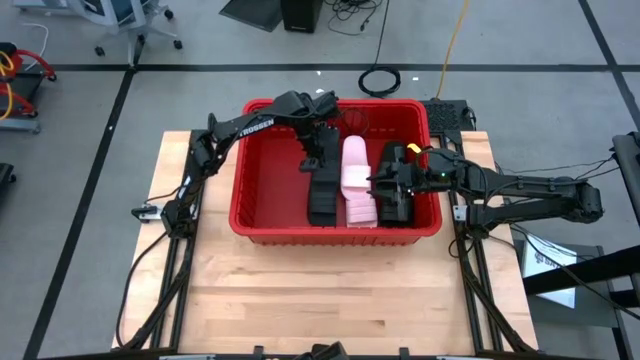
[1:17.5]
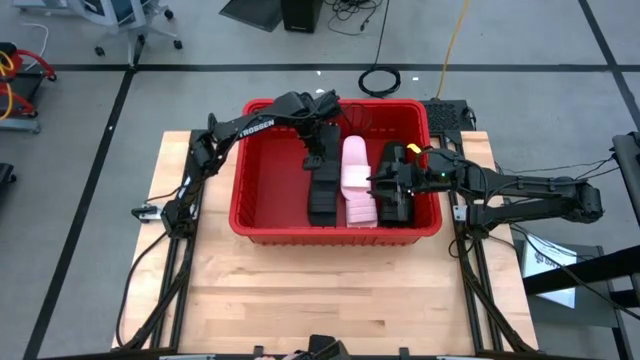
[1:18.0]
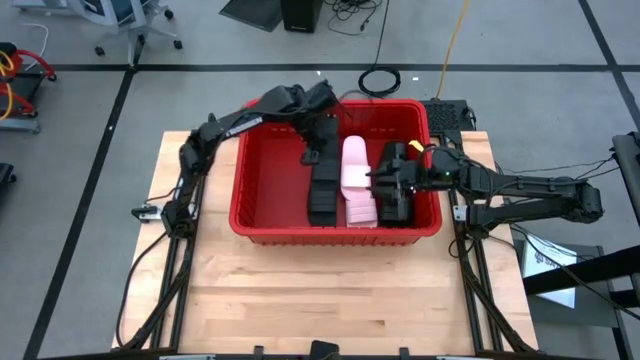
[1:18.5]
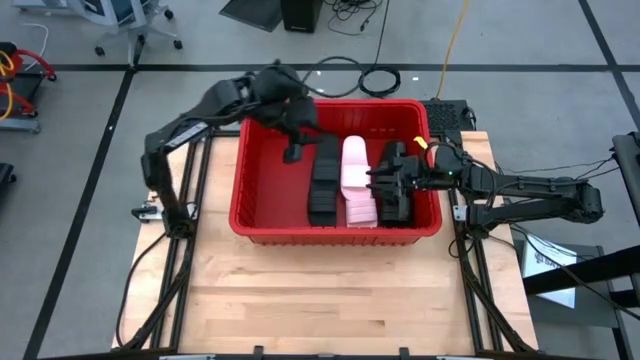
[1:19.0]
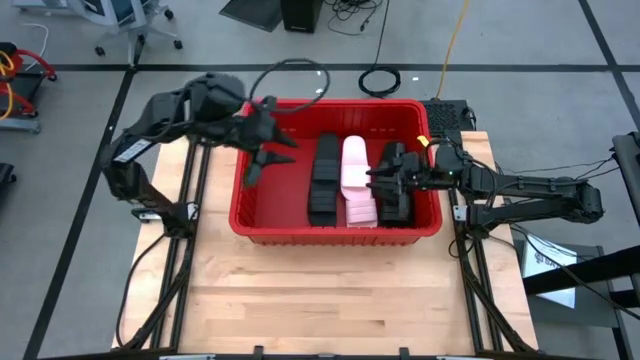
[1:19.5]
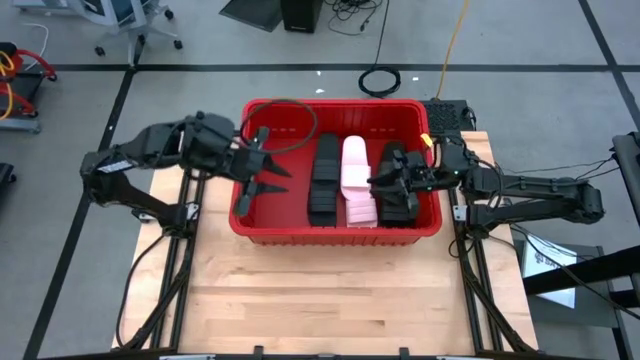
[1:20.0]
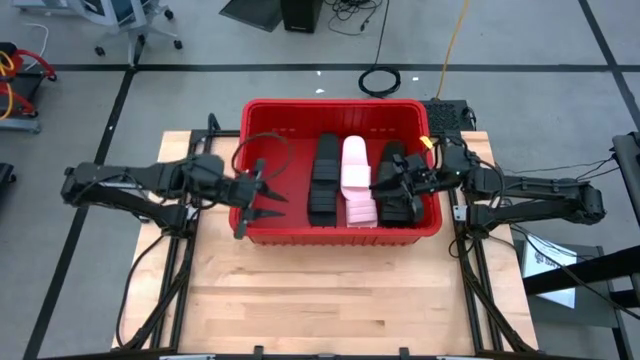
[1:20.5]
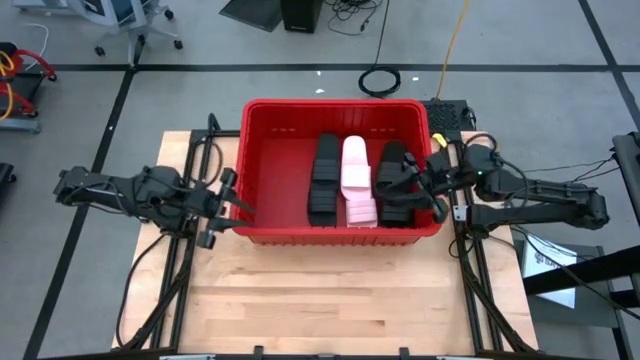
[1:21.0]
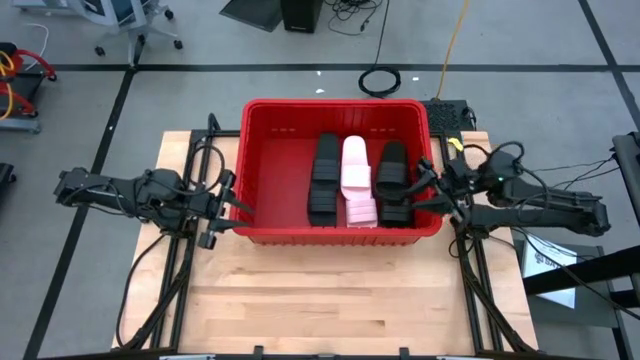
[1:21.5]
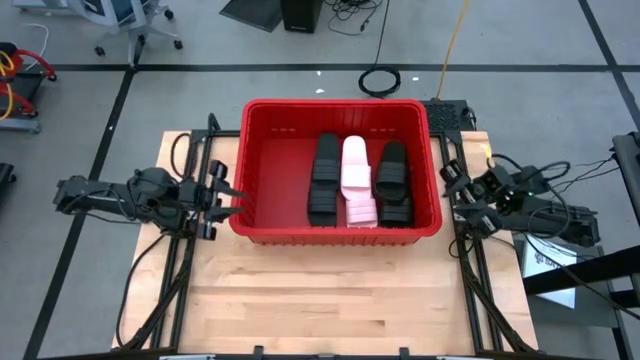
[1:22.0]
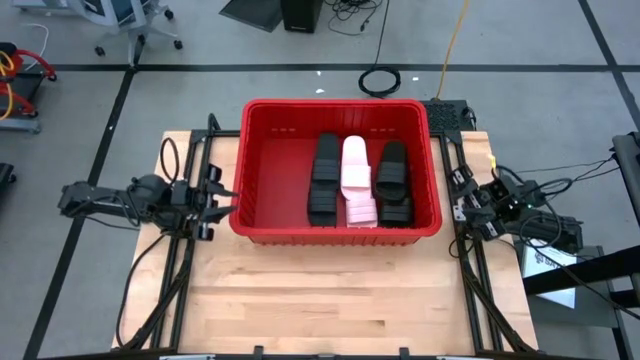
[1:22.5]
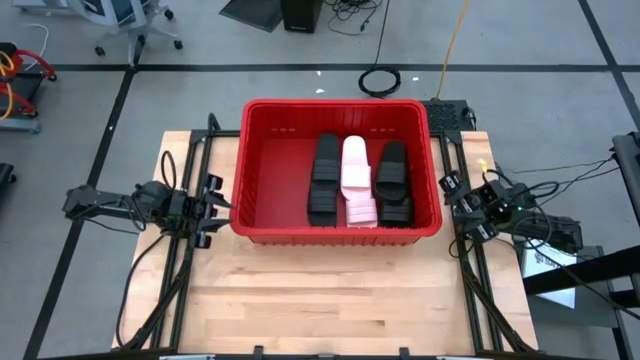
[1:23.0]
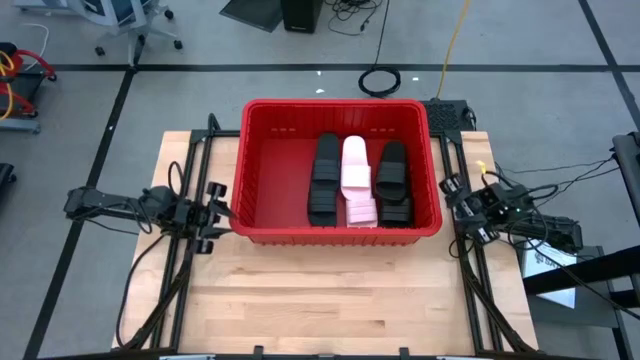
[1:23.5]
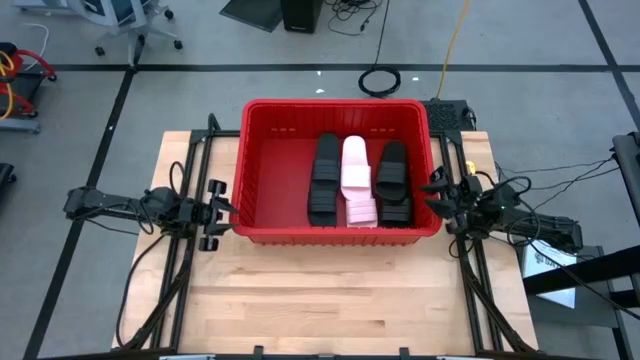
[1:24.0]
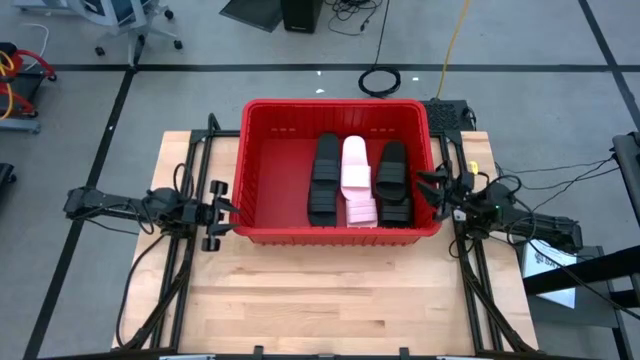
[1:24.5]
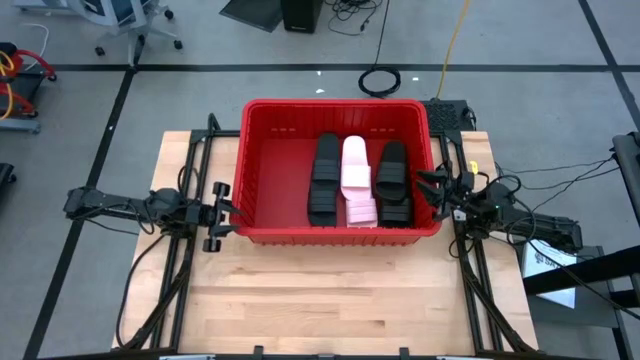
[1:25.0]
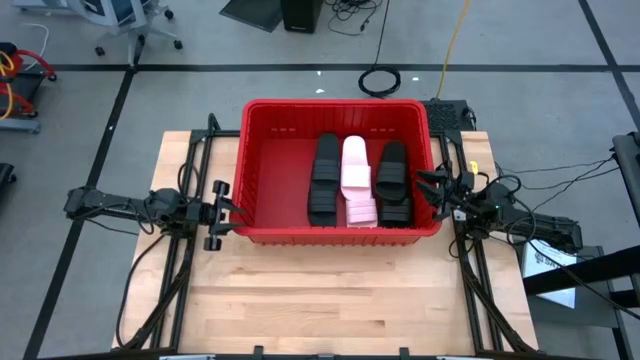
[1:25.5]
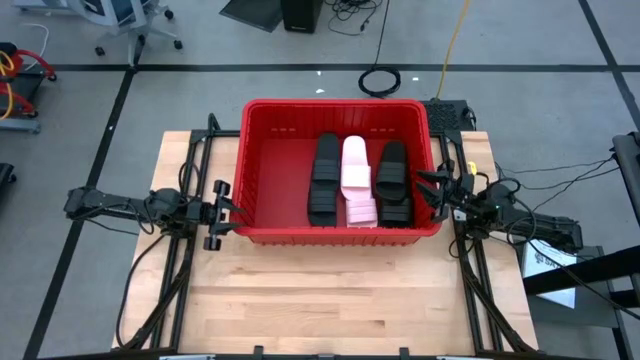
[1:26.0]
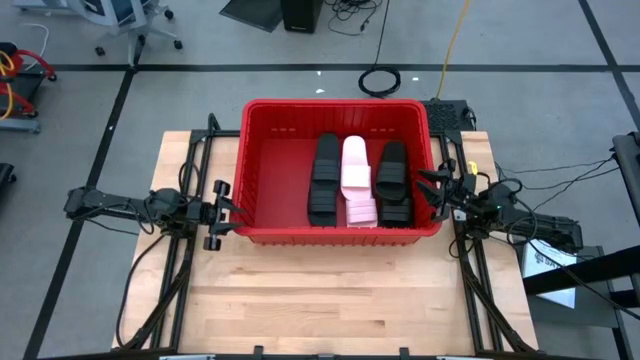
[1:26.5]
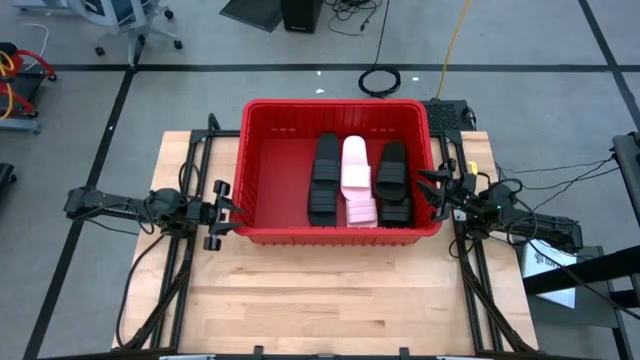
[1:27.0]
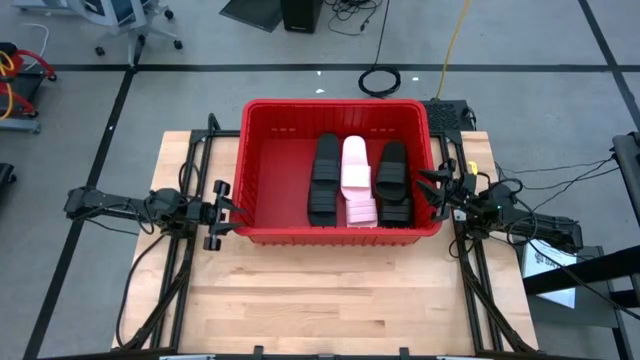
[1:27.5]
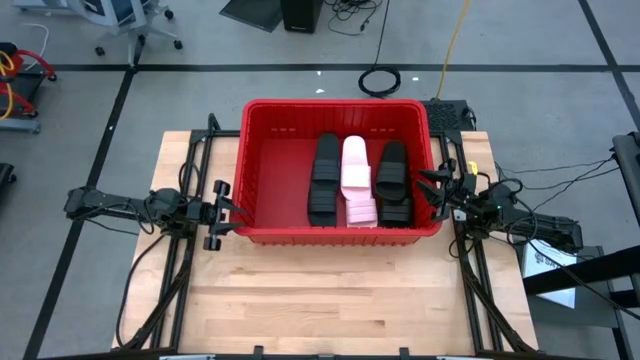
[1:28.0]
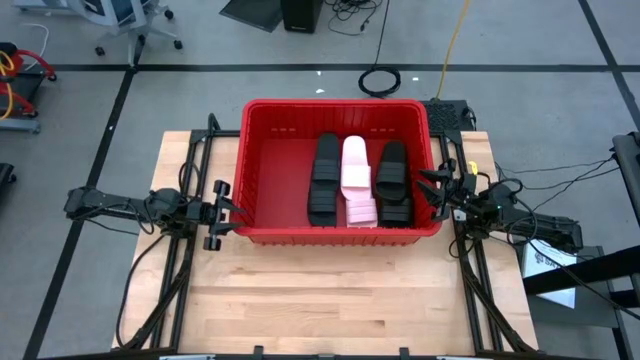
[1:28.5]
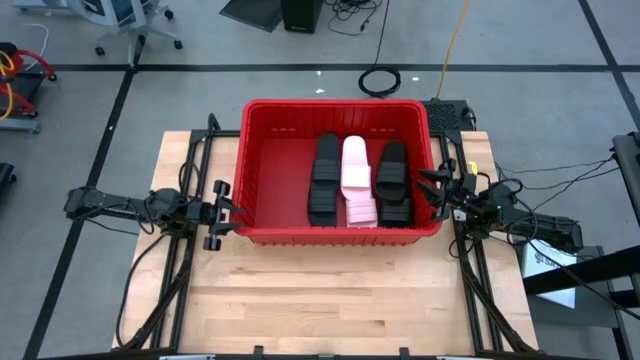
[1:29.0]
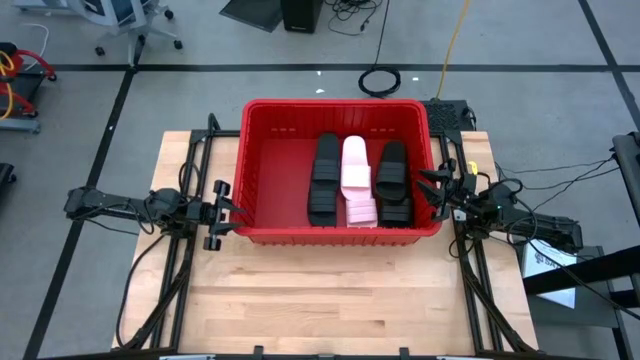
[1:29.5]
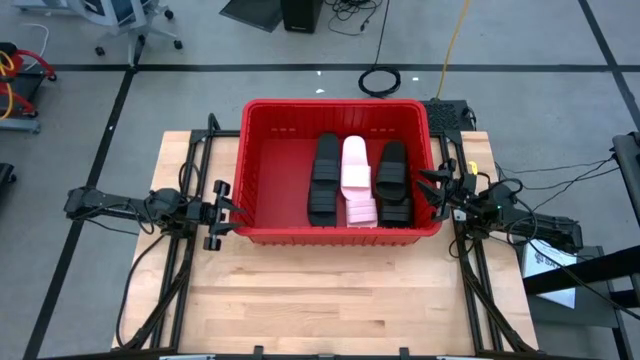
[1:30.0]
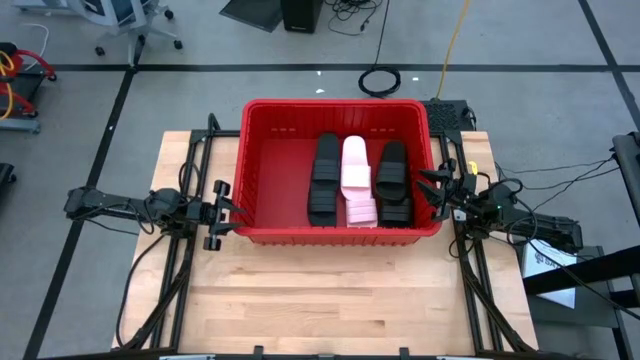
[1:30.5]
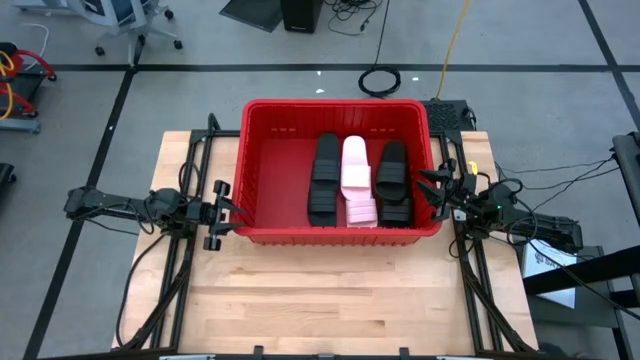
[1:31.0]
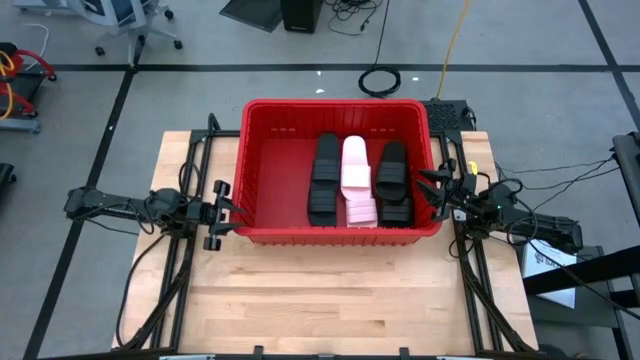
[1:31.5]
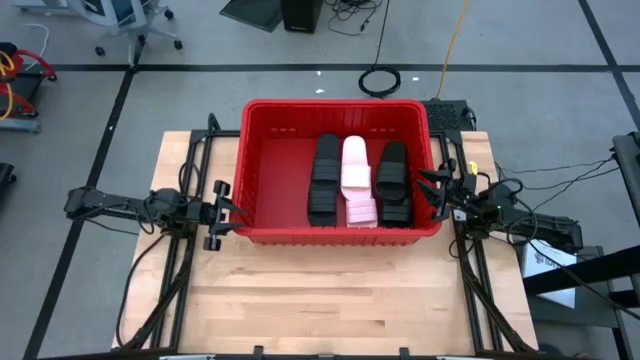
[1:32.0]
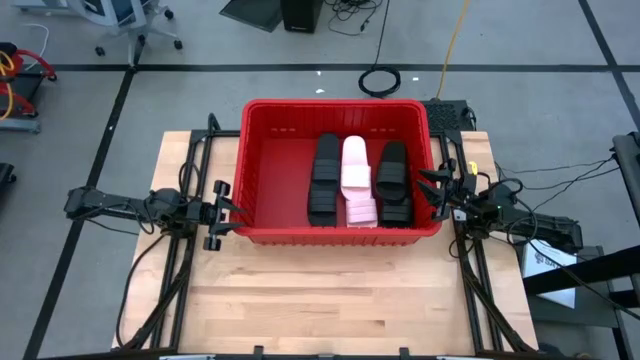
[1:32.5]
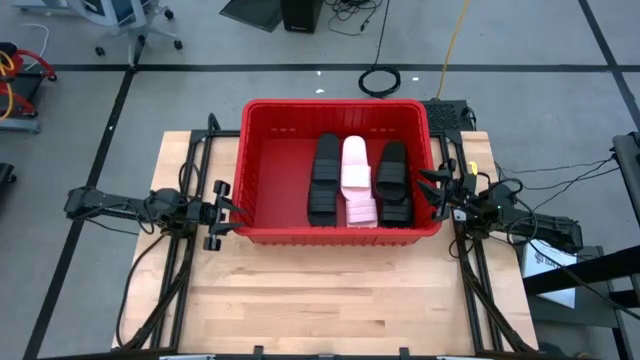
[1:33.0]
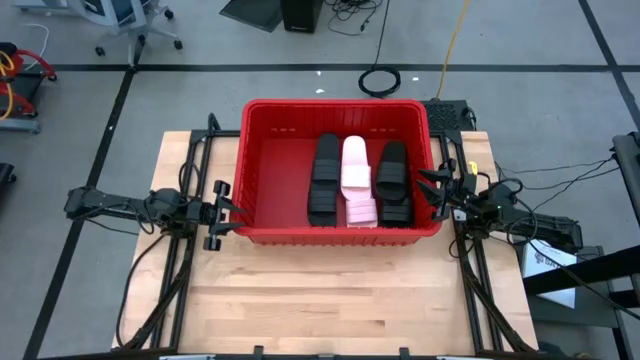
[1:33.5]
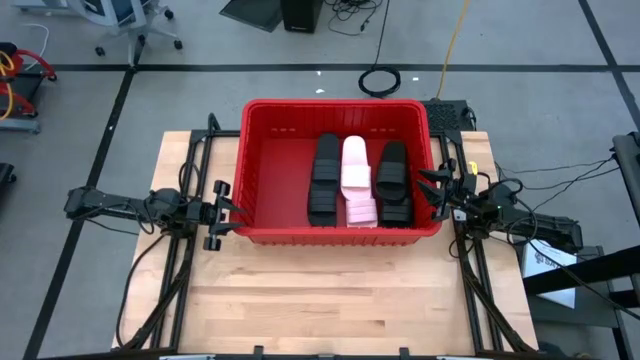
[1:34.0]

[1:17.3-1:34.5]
Task: Pick and place slides into bin
Return to Home Position

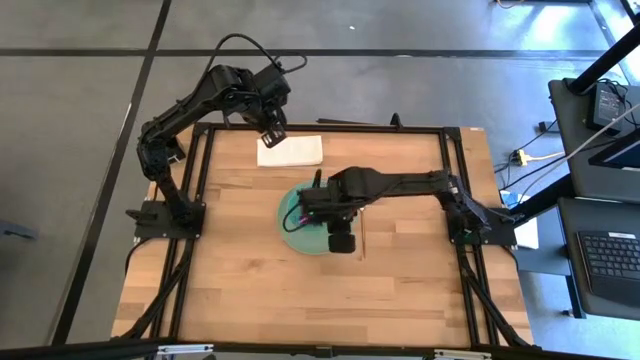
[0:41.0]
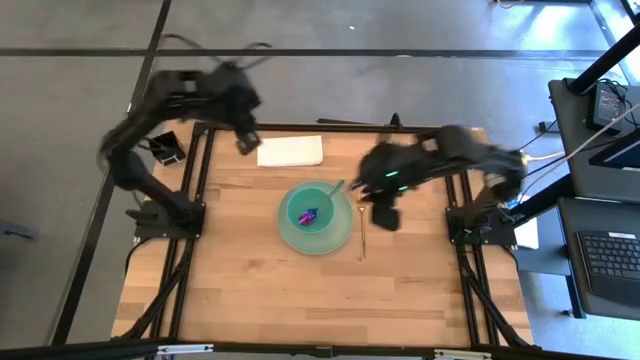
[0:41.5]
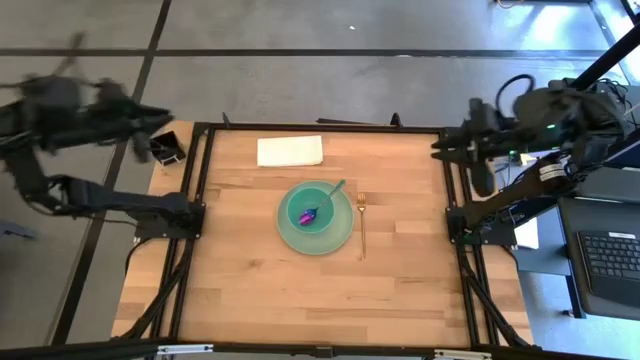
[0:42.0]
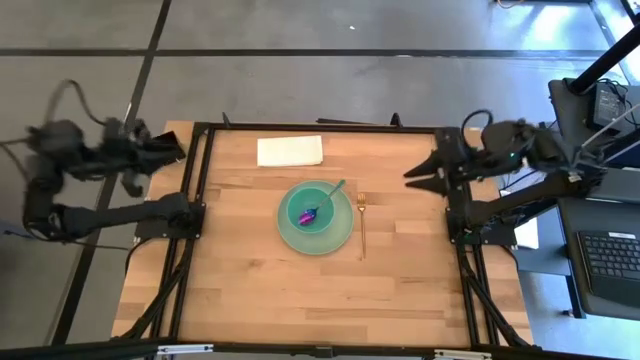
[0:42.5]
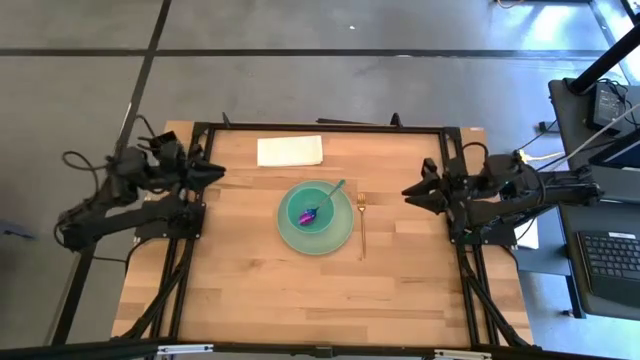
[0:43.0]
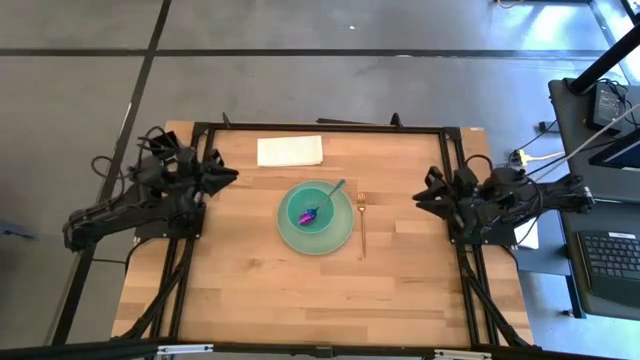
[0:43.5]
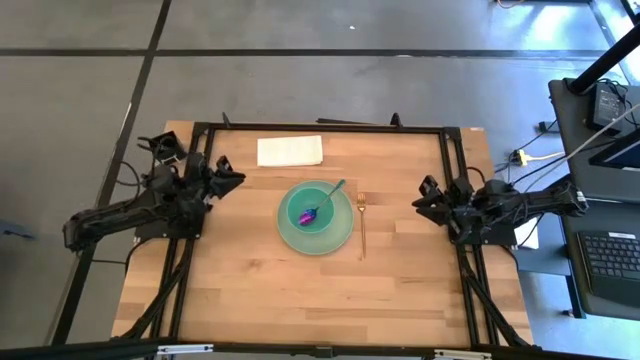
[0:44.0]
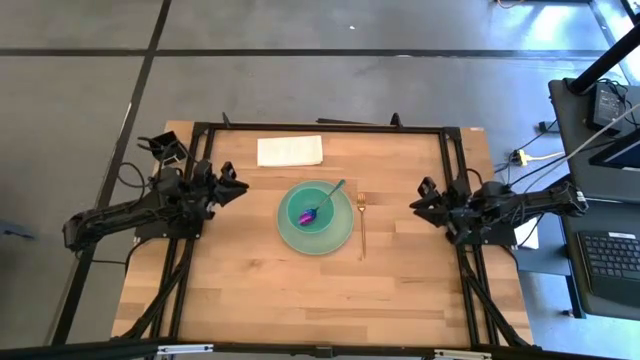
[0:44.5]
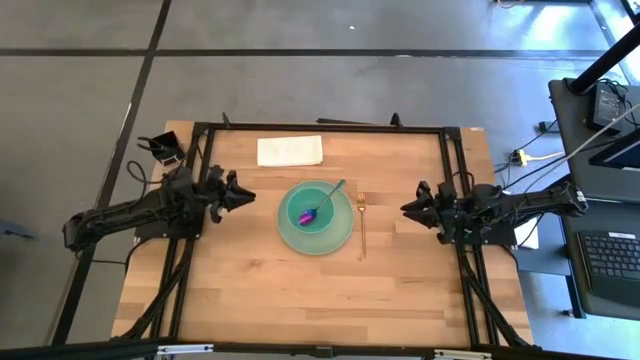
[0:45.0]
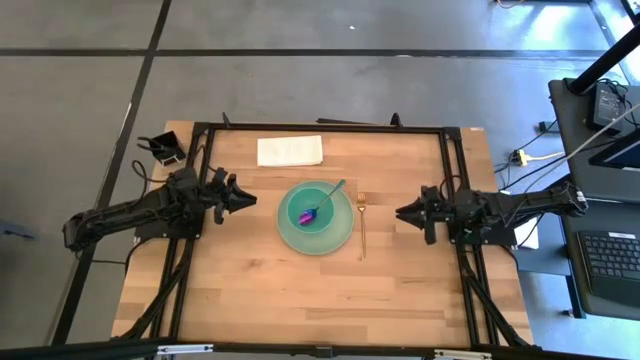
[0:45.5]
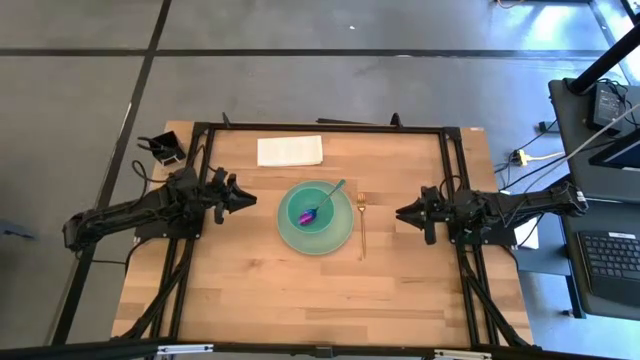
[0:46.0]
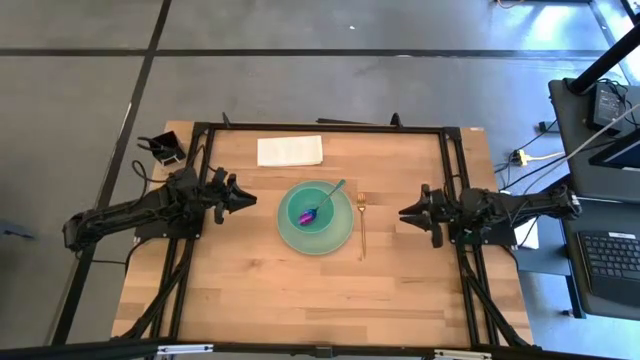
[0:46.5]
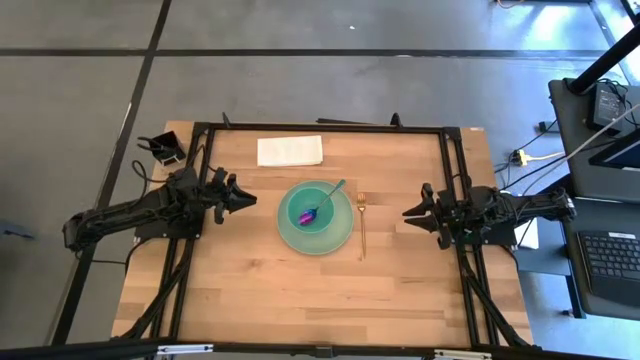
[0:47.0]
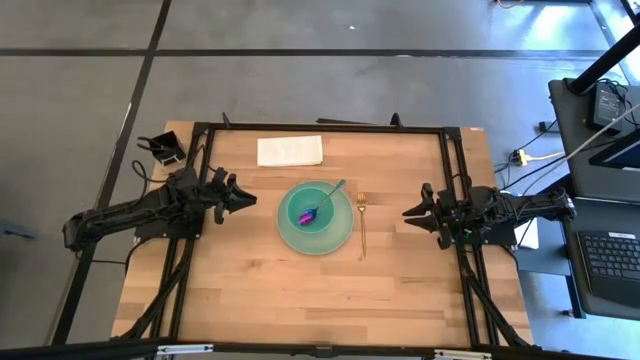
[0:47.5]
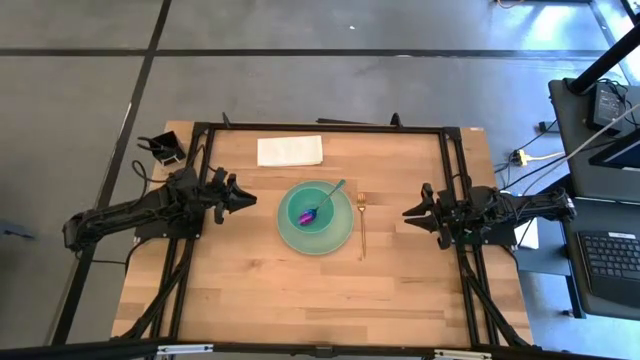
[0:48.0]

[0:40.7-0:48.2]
Task: Set table place
Return to Home Position
